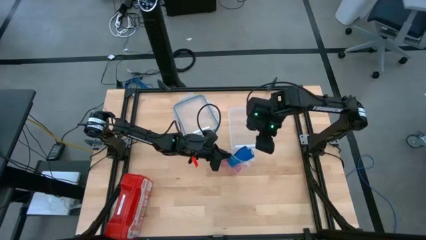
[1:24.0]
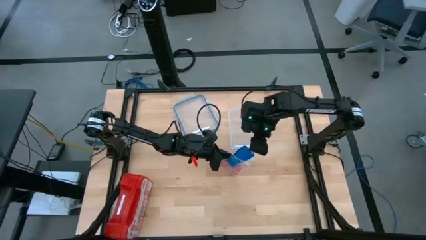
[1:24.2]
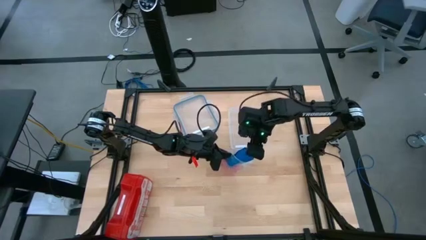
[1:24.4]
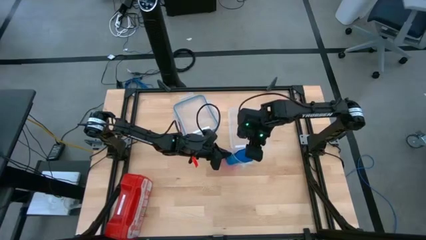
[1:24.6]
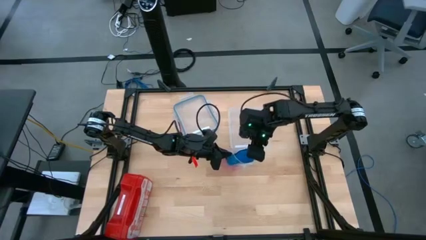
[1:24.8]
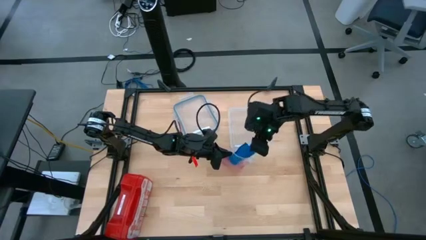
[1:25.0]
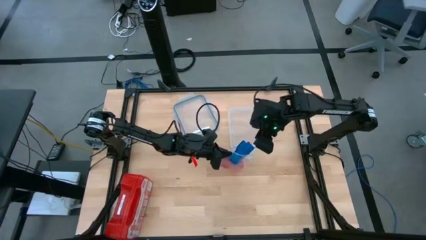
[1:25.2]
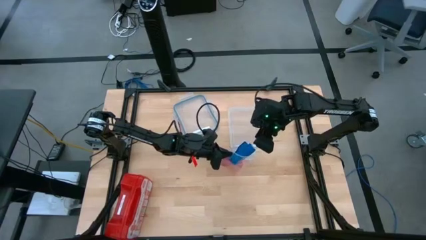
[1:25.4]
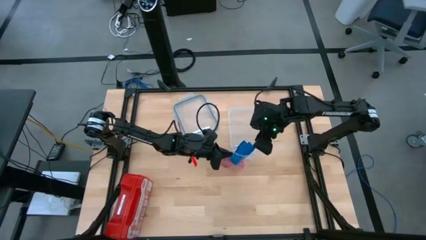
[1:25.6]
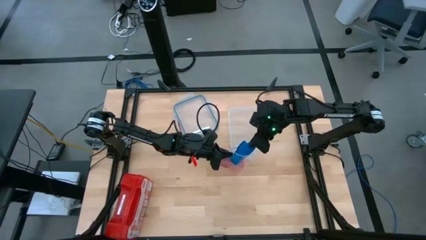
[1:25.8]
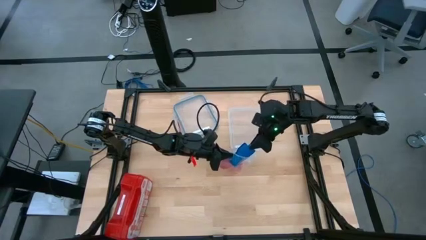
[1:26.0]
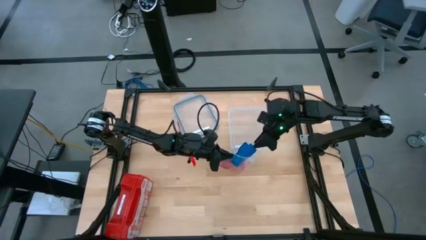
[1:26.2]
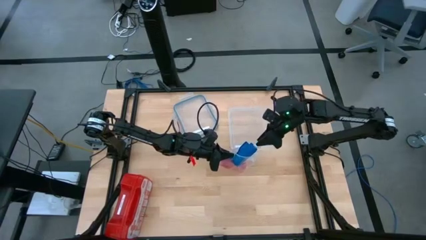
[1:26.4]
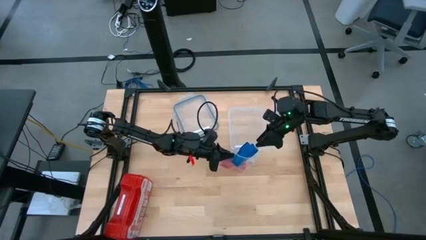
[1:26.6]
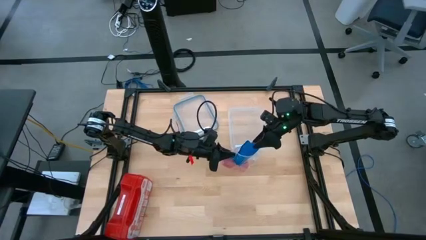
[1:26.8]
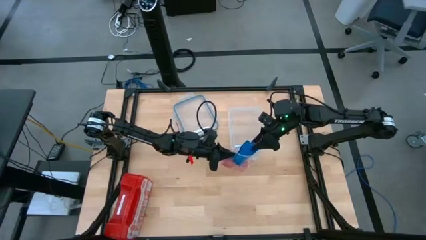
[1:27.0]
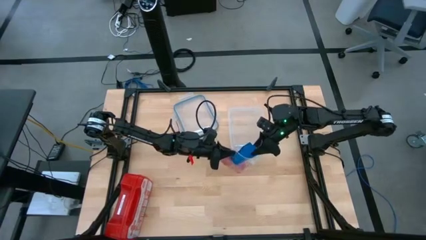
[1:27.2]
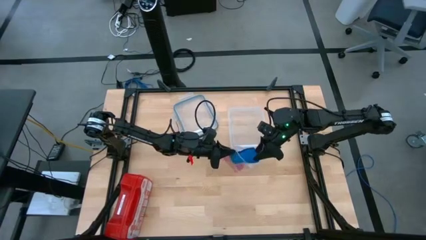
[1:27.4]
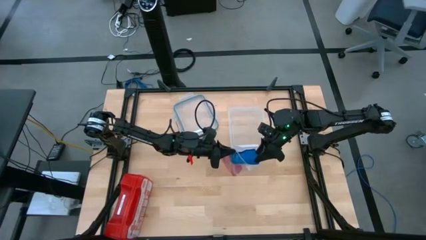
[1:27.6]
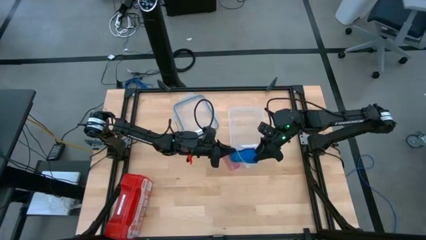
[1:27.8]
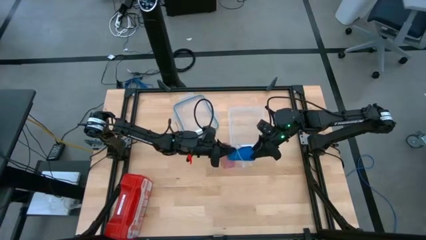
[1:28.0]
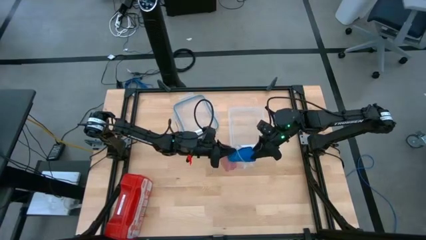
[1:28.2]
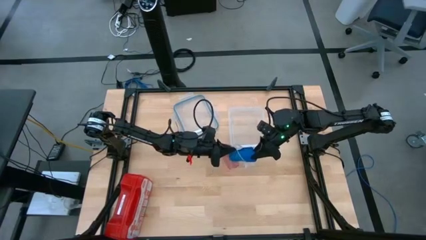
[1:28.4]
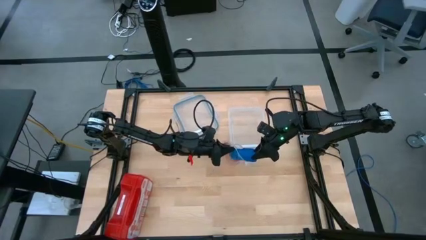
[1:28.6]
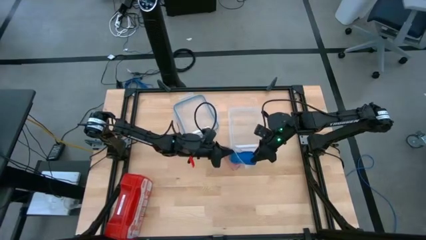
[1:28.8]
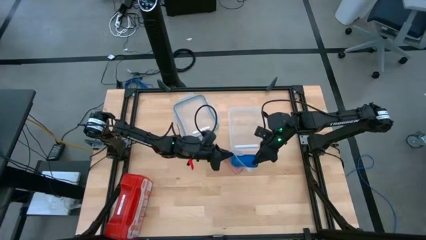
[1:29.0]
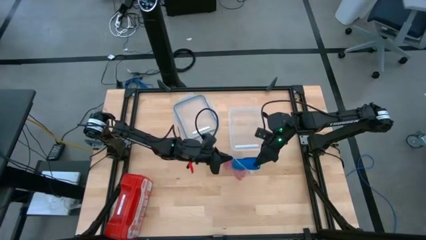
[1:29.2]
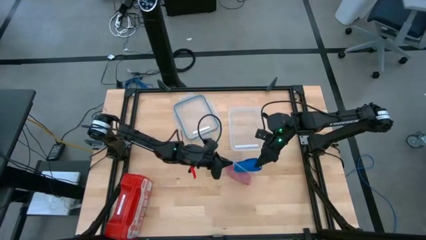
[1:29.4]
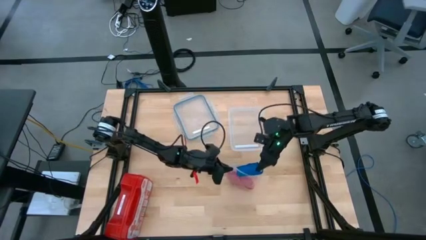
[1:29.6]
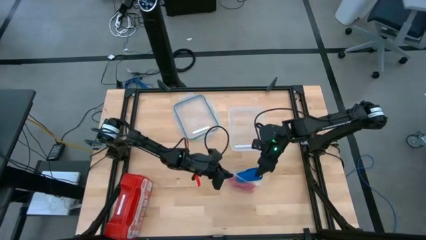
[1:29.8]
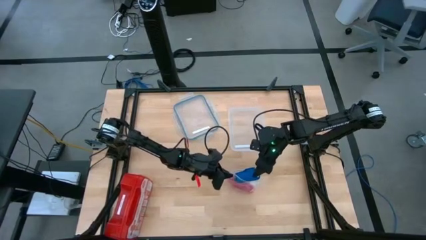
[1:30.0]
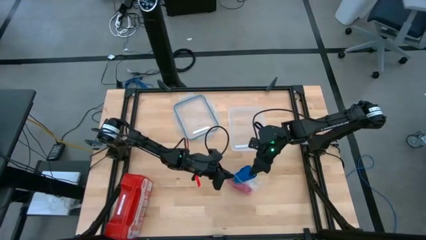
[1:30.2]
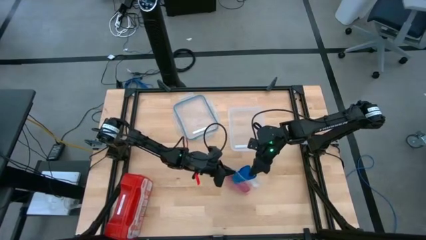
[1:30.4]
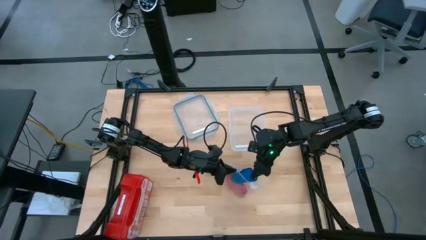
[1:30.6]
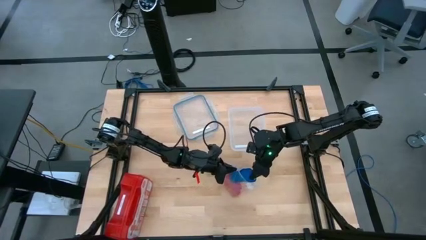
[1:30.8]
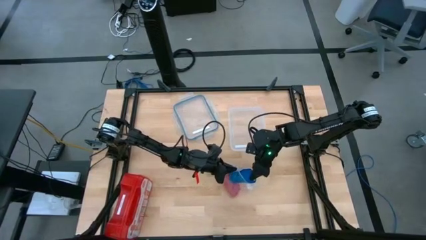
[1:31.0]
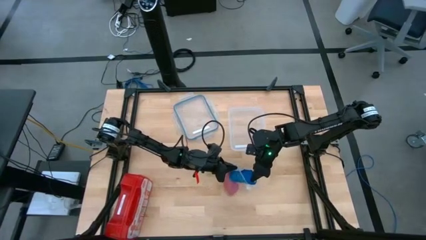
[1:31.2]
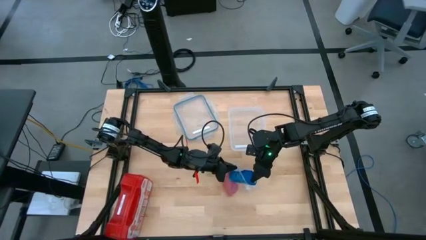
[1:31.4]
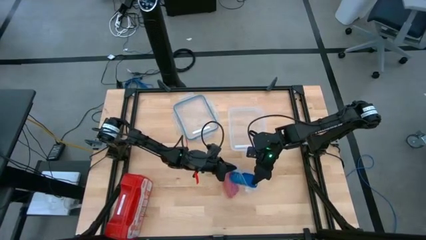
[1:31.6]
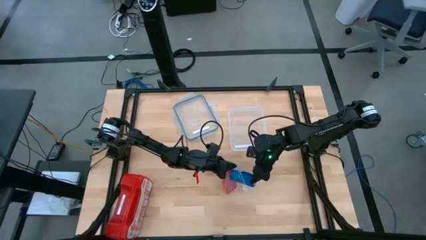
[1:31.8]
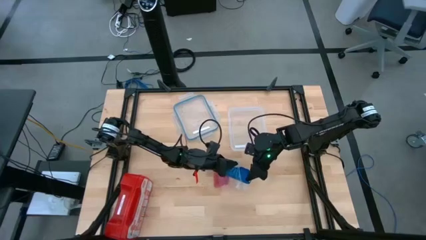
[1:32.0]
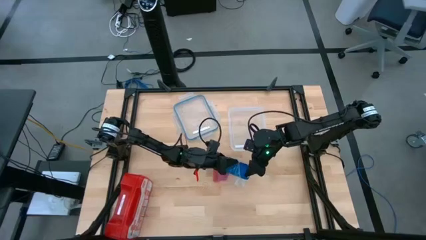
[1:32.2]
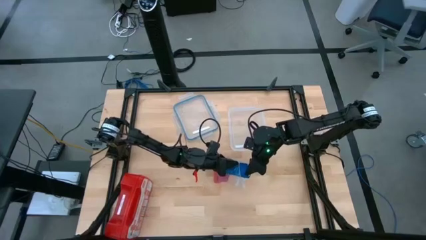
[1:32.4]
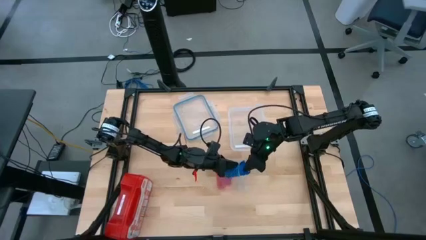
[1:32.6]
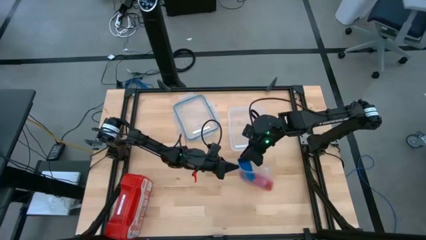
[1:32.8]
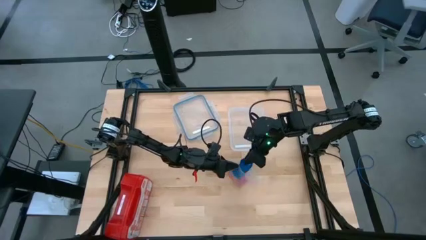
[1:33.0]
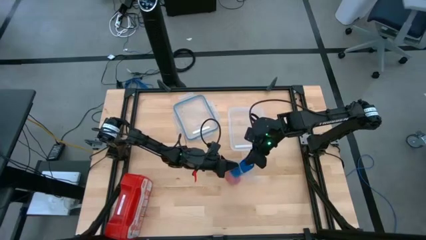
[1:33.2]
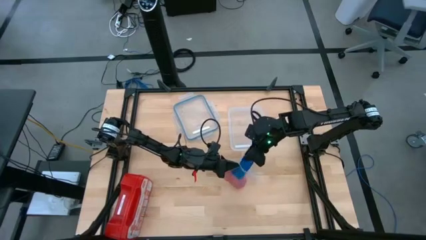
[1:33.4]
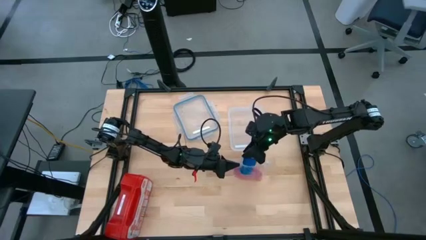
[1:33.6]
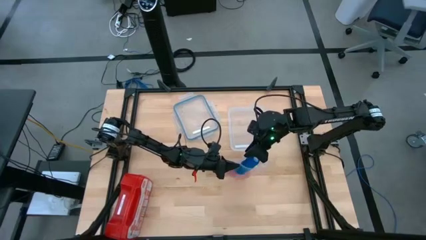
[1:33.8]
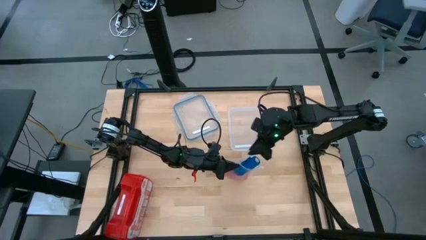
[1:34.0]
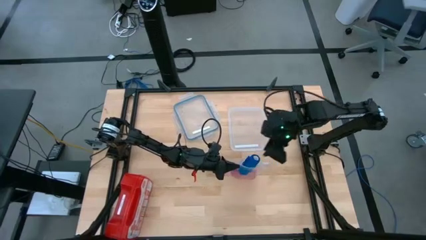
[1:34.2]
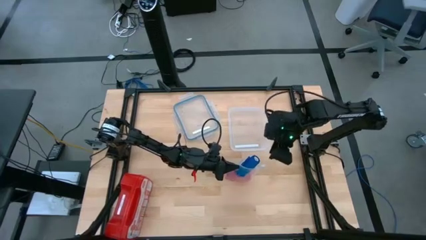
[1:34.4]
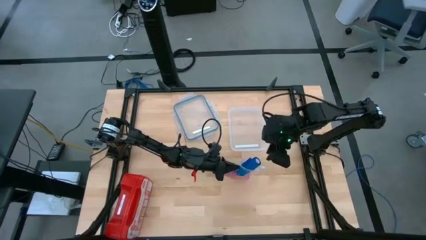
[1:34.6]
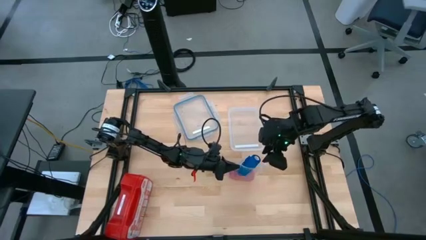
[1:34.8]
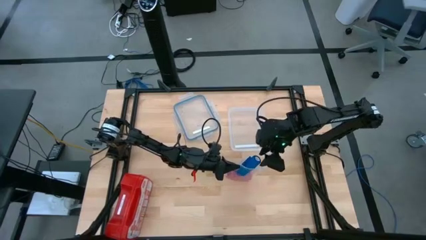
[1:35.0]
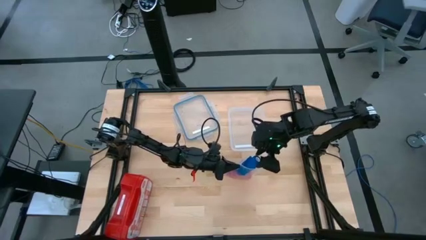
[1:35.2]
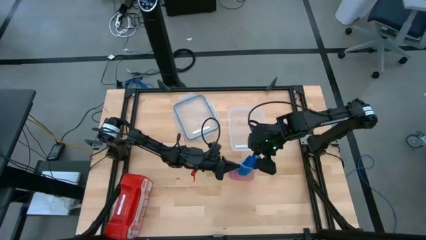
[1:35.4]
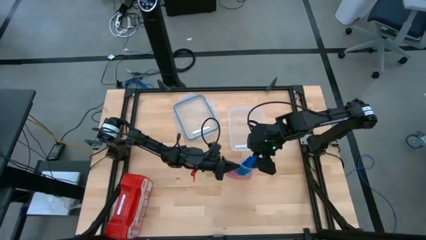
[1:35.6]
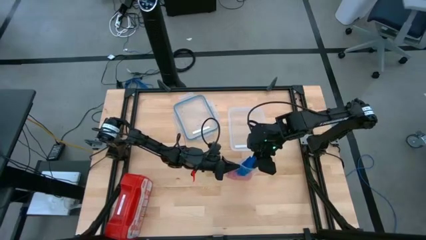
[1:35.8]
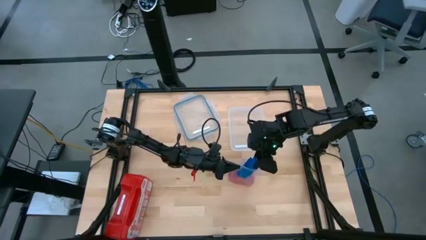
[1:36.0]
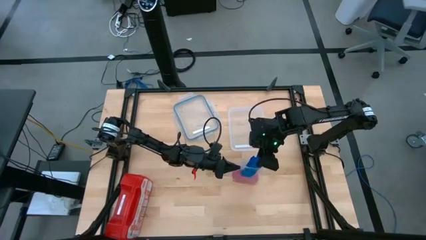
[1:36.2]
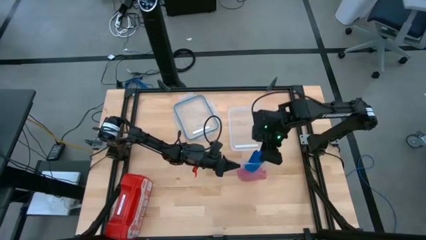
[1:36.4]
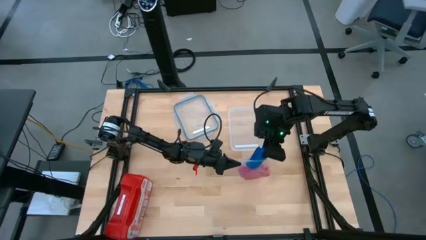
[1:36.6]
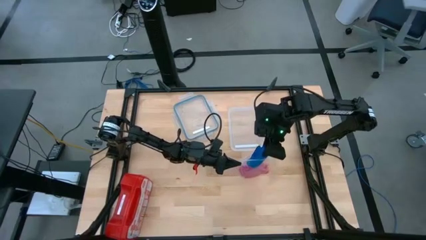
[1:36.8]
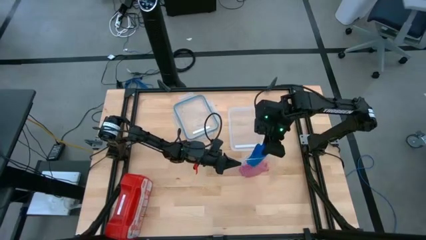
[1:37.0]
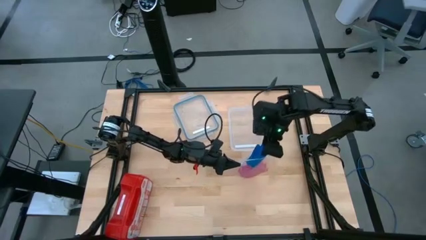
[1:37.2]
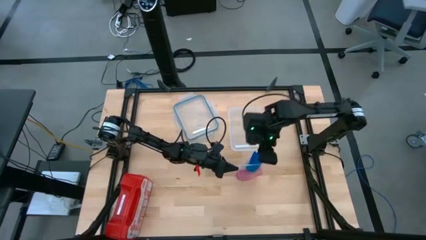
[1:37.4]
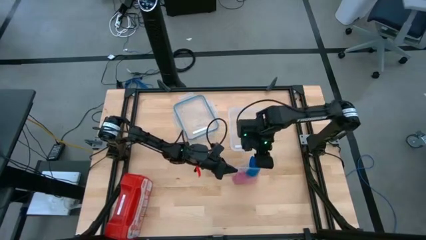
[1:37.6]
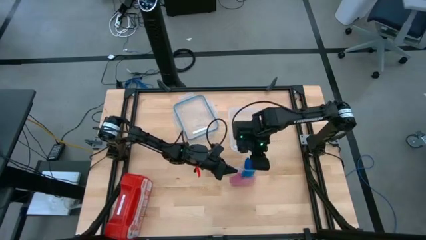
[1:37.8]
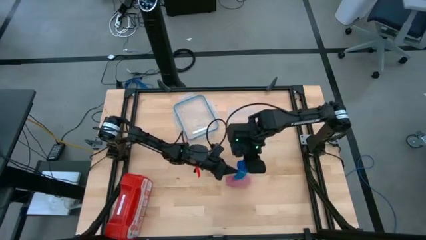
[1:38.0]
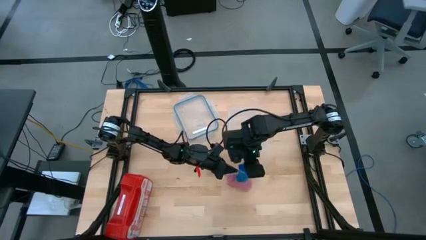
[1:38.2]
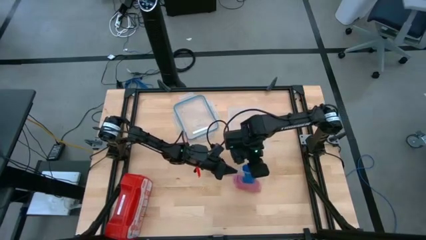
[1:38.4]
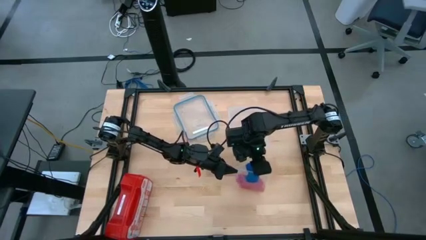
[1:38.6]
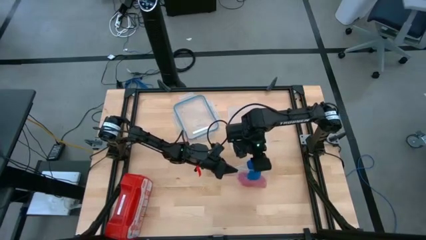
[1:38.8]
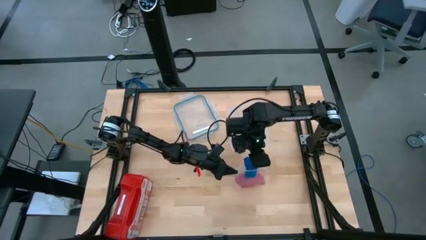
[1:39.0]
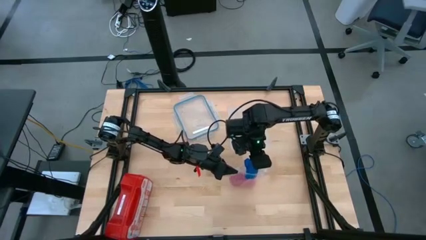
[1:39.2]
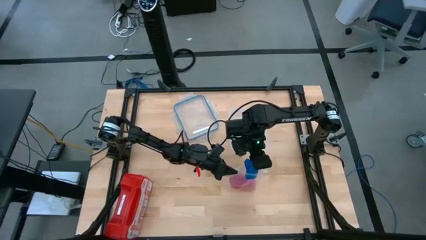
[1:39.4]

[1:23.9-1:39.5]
Task: Roll bandage
Put the blue bandage into the transparent zip bag

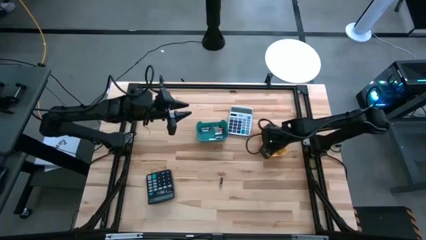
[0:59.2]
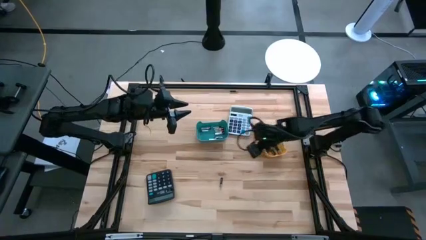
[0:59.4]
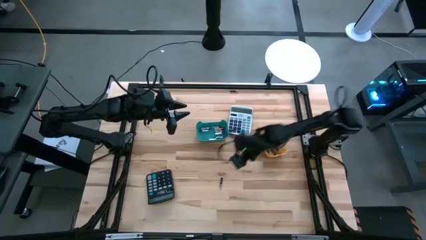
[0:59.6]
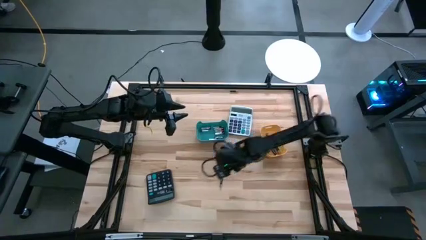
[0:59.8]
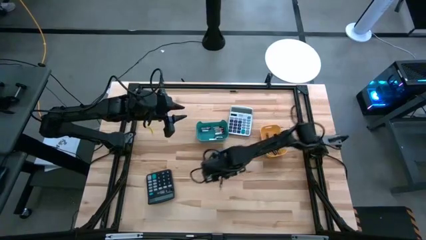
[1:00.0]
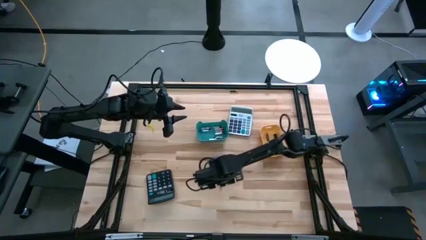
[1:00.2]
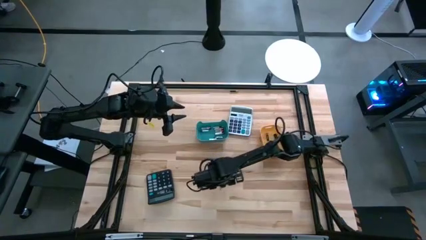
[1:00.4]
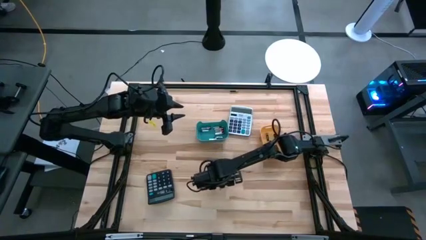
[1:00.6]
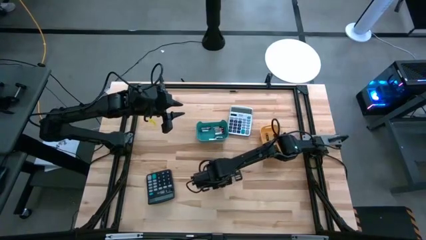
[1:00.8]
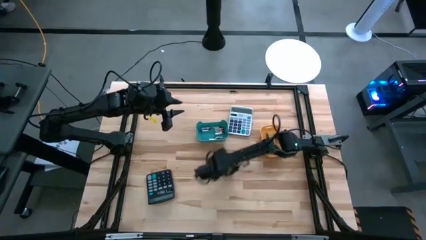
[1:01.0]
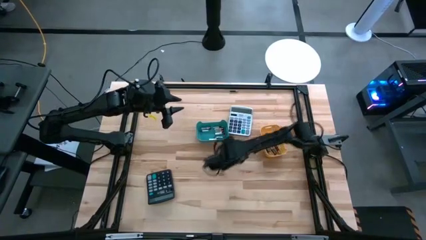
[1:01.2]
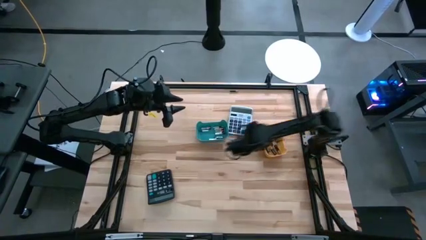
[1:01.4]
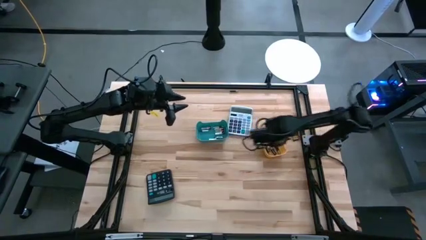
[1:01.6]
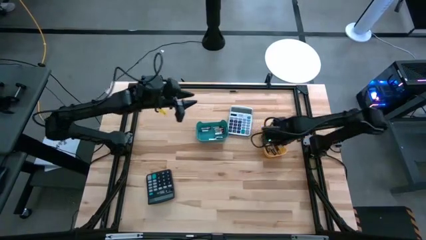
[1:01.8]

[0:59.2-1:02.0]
Task: Sort batteries
Put the black battery into the yellow bin
